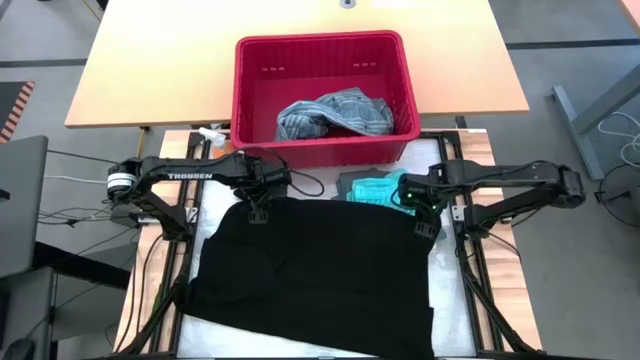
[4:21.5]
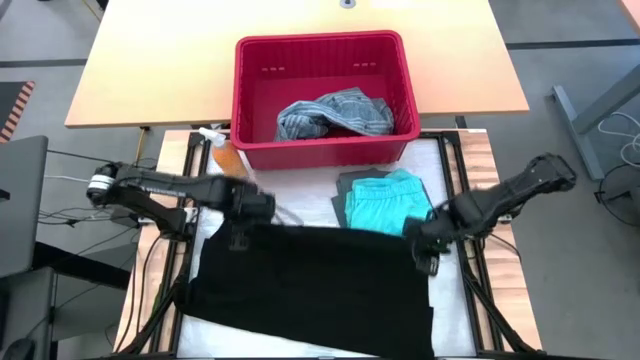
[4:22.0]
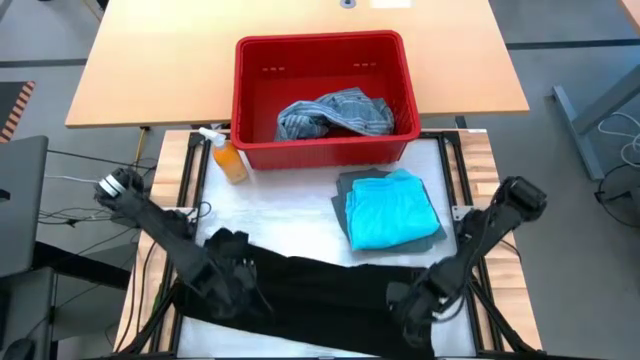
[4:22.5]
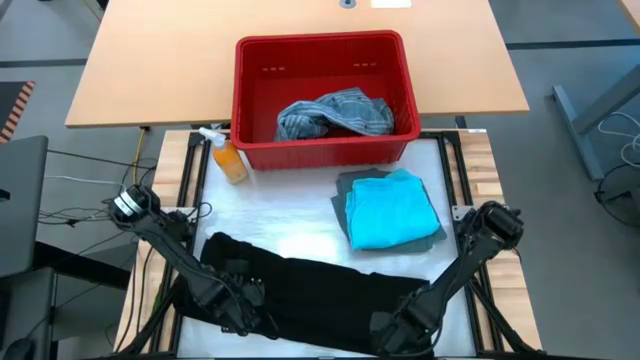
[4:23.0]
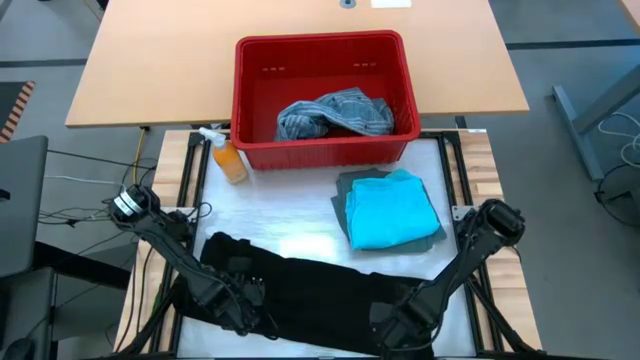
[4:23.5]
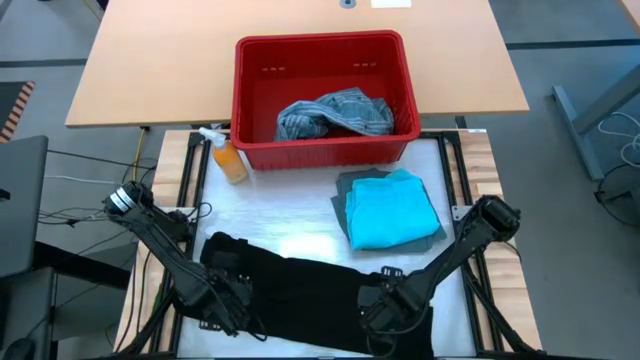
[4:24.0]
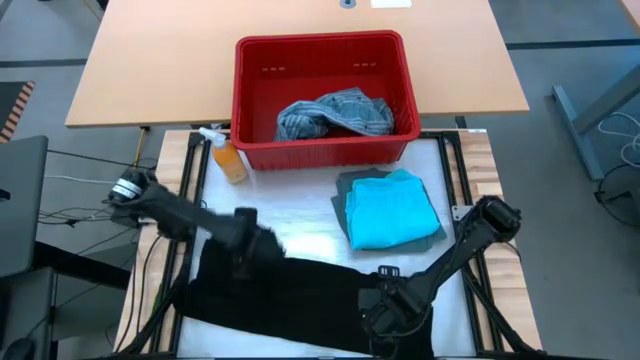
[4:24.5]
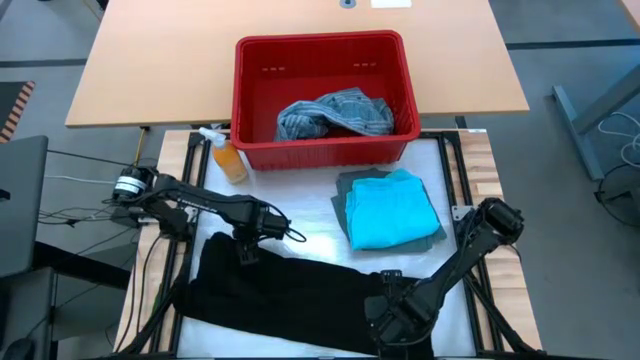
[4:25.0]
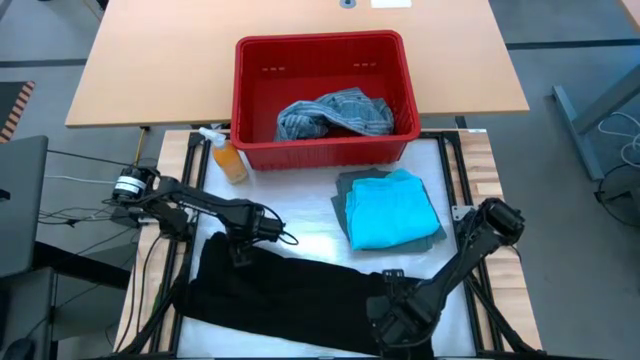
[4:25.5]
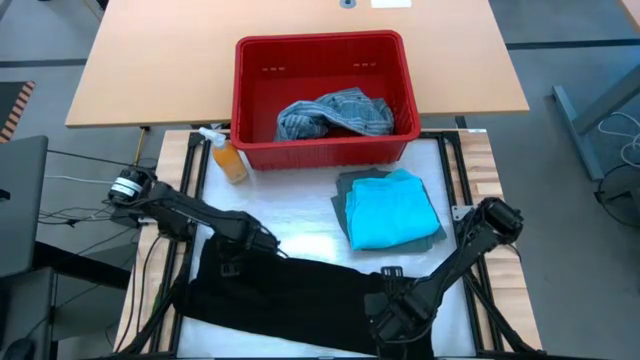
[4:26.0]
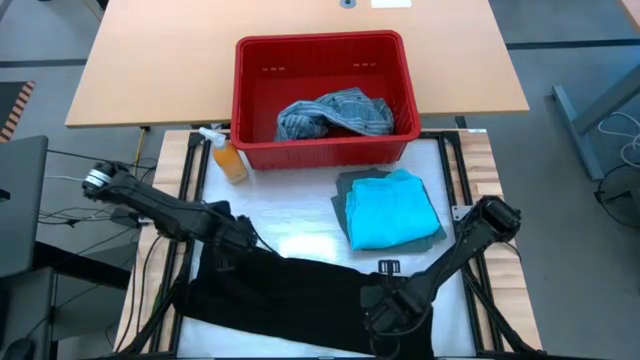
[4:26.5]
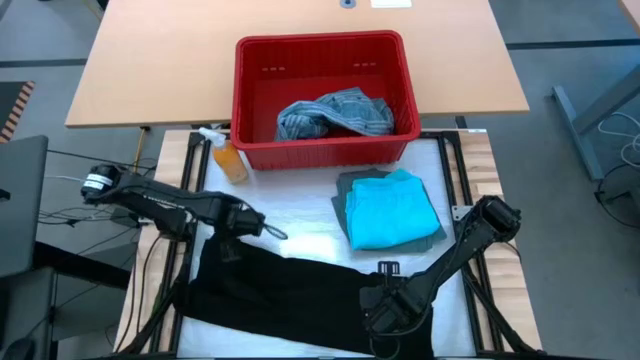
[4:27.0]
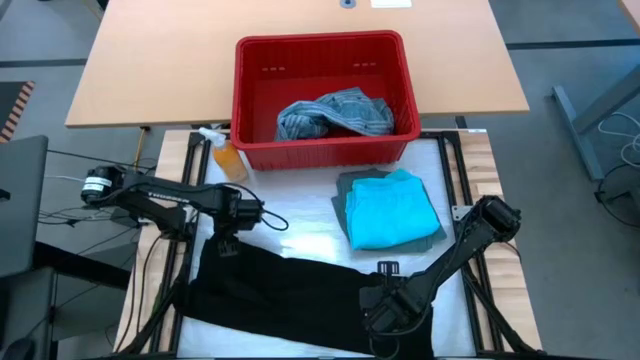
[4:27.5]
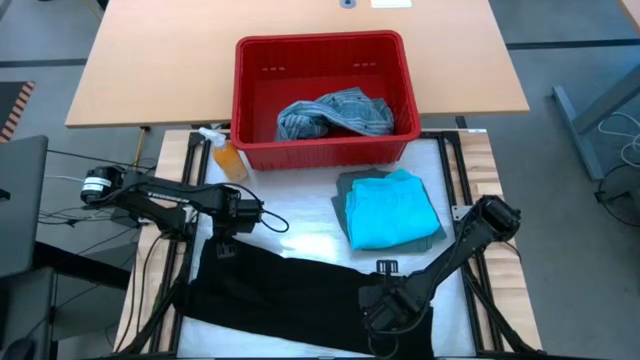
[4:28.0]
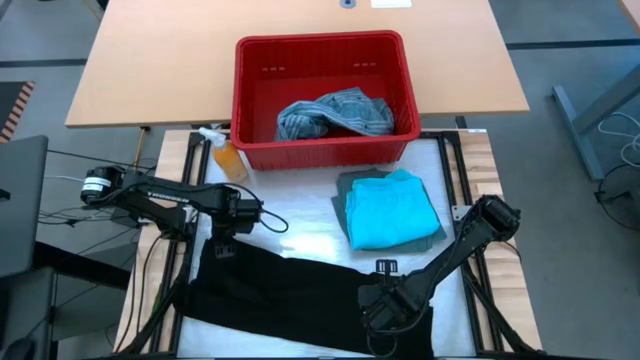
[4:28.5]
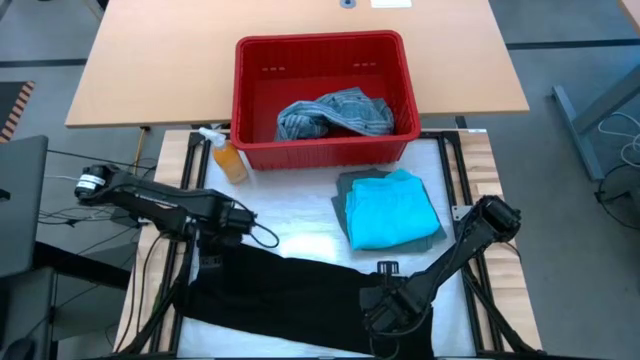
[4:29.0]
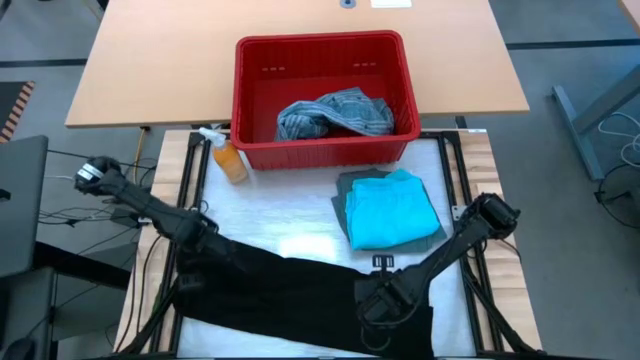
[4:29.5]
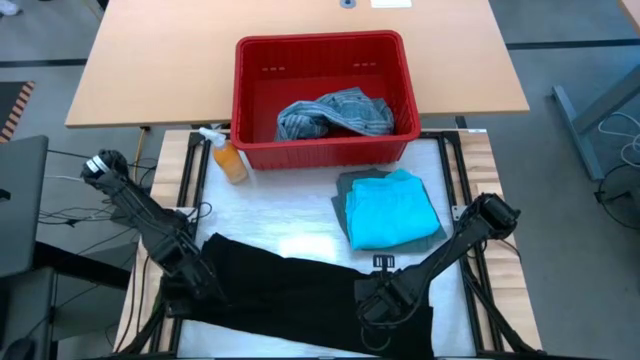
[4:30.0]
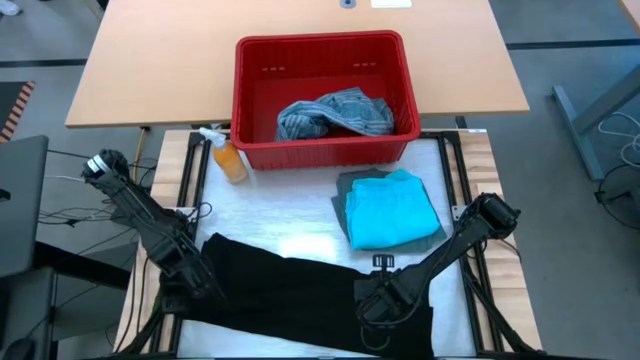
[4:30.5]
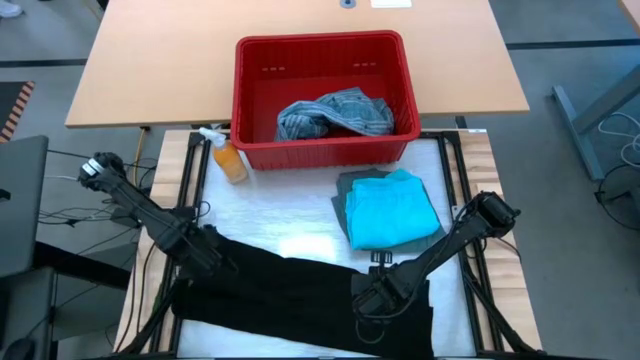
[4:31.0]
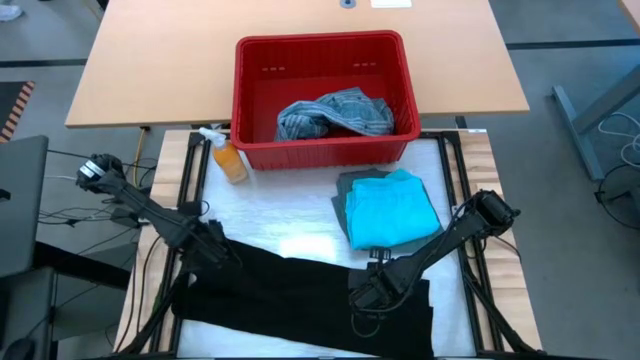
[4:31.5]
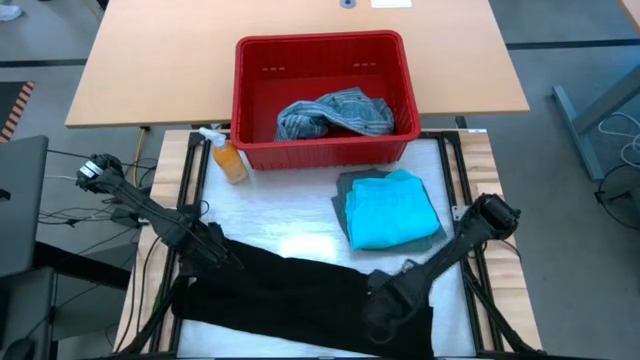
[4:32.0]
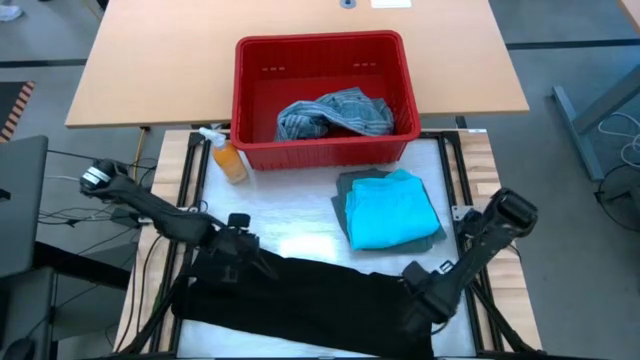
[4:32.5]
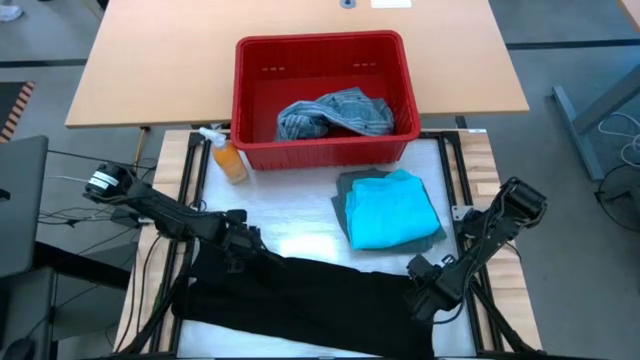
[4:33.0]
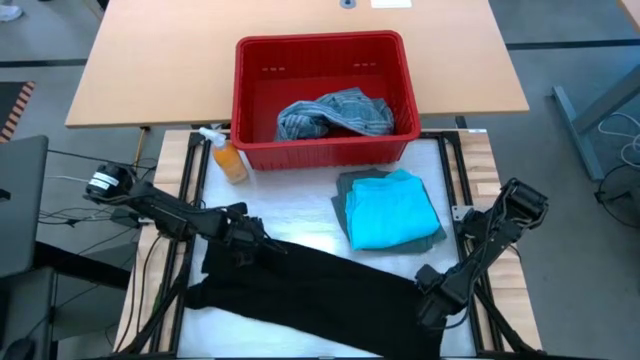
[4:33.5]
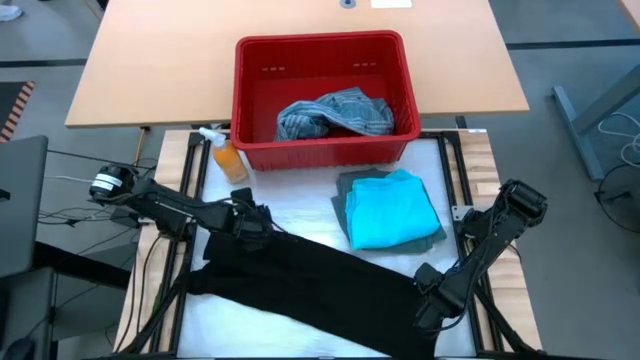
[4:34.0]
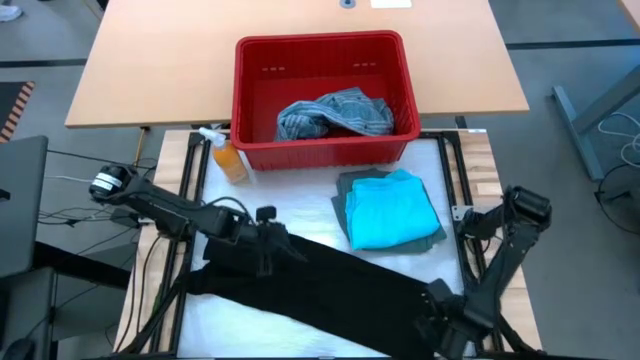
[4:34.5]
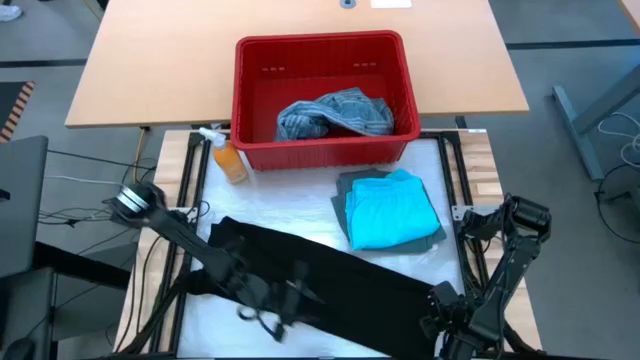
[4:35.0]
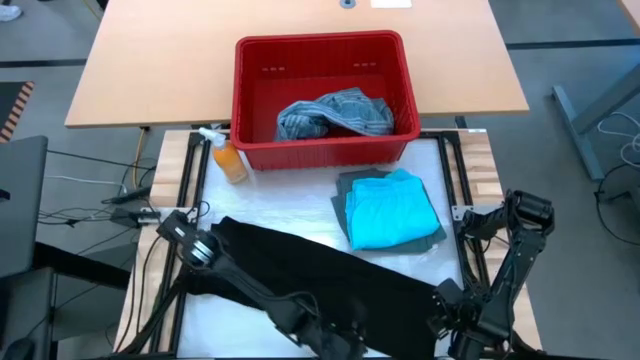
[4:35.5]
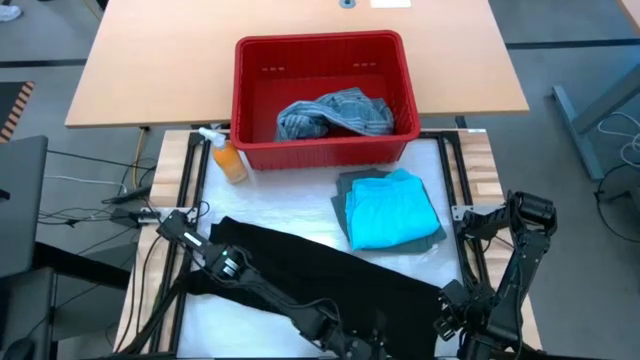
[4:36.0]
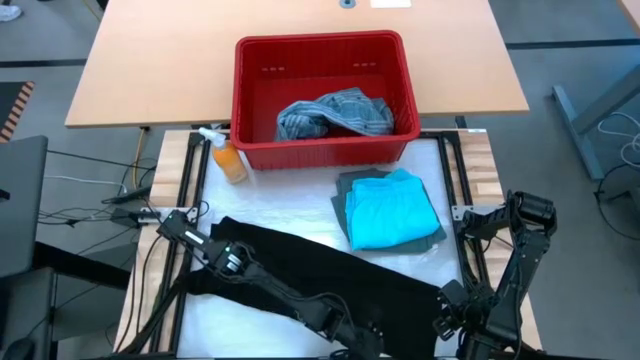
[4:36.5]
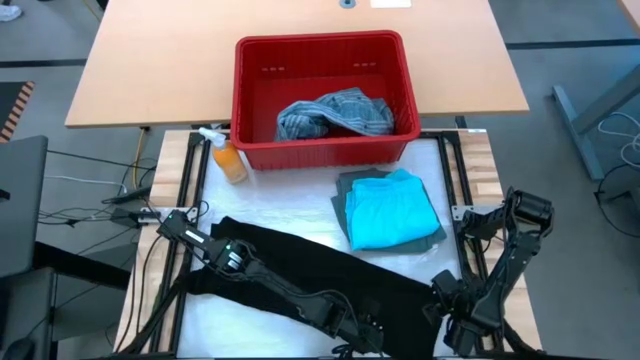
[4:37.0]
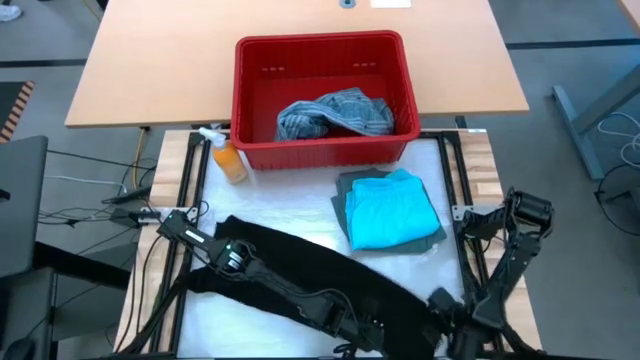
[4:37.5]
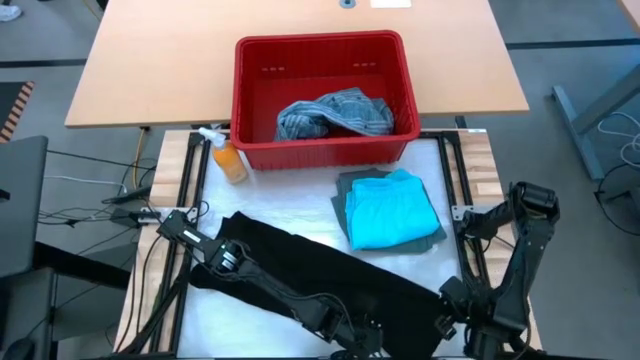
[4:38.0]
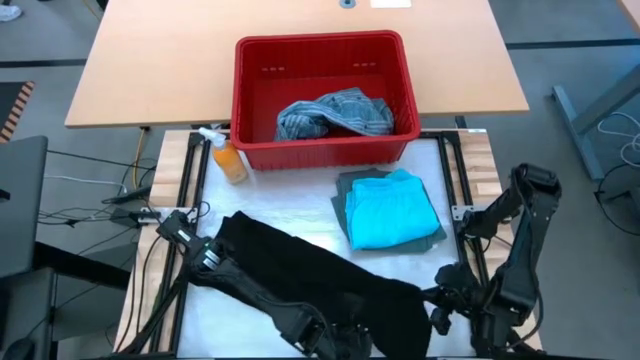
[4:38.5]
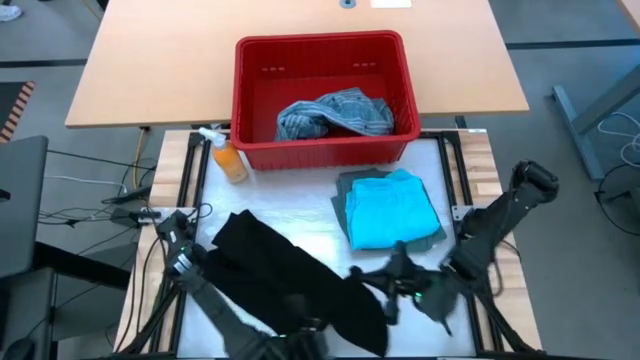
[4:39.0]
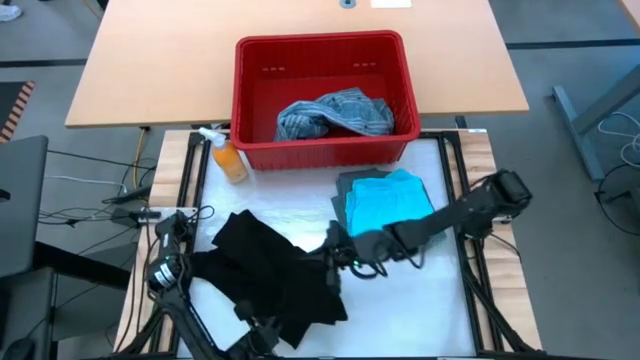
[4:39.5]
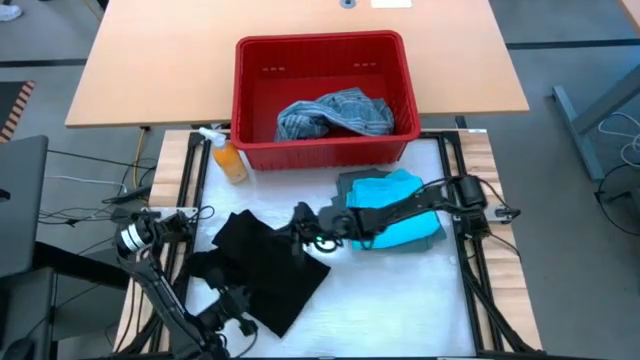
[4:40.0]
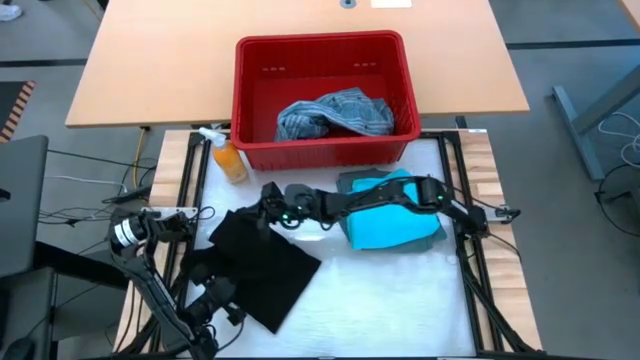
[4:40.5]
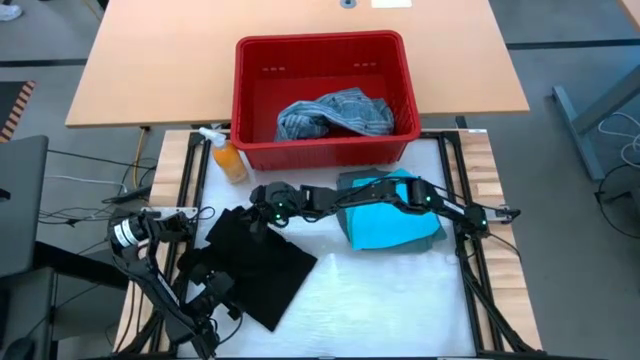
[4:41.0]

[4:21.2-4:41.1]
Task: Fold Laundry from Bin
Fold the black shirt

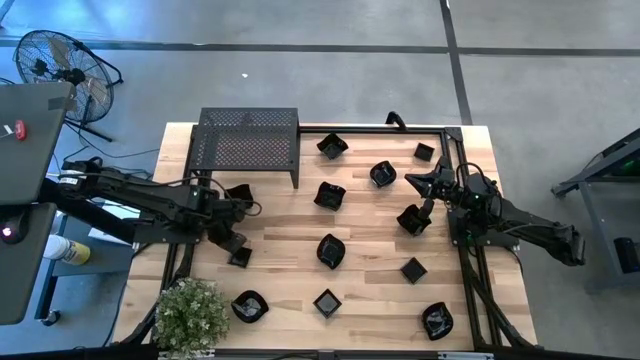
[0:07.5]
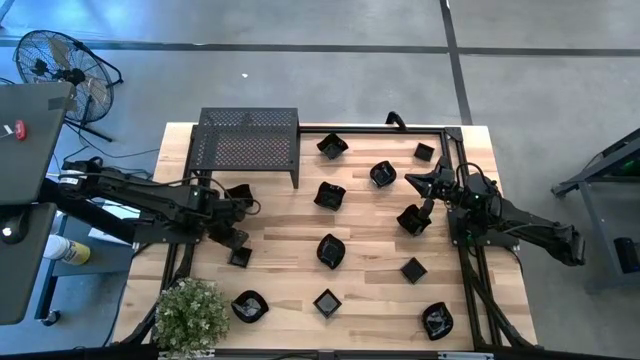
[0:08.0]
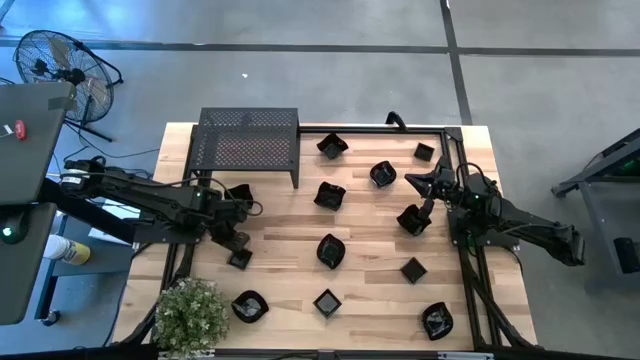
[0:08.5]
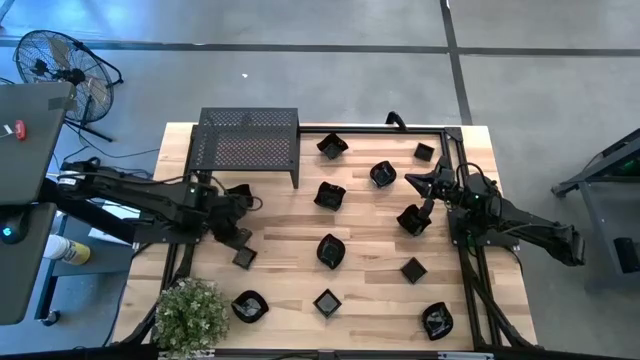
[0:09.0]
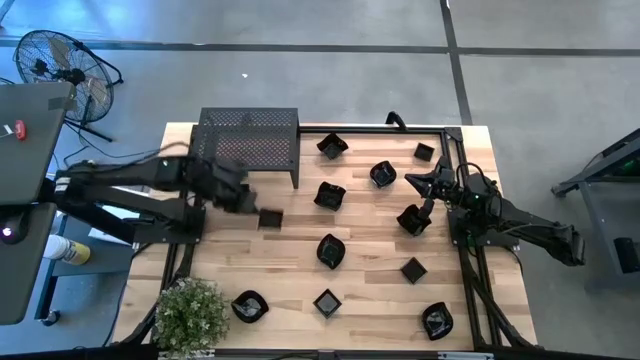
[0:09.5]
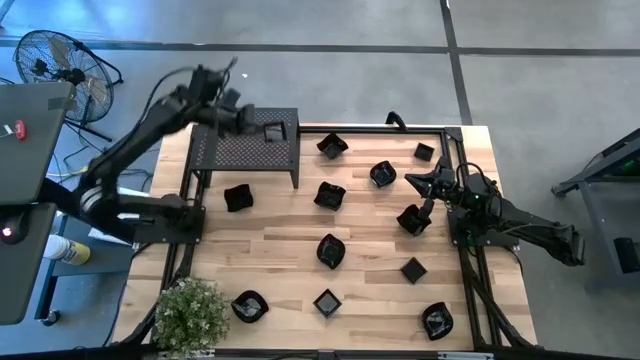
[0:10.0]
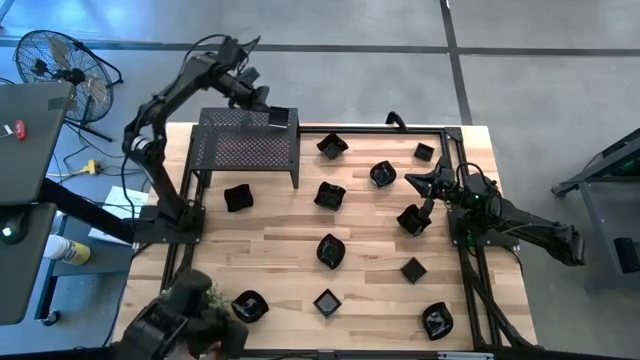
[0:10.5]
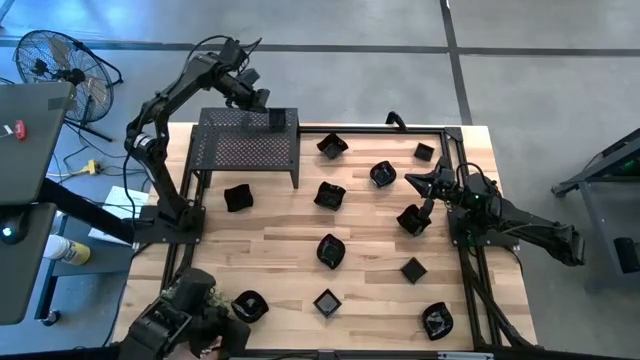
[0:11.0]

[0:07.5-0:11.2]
Task: Pick & Place Mini shaped plates
Put the square plate on the shelf
